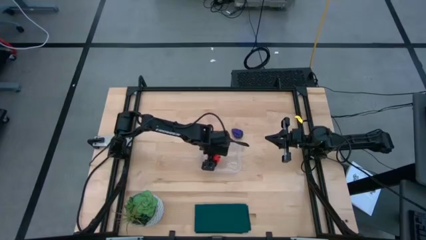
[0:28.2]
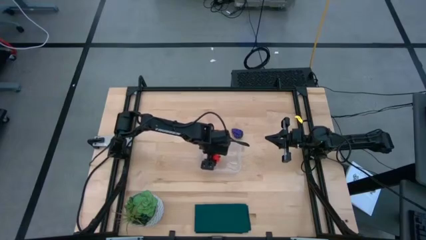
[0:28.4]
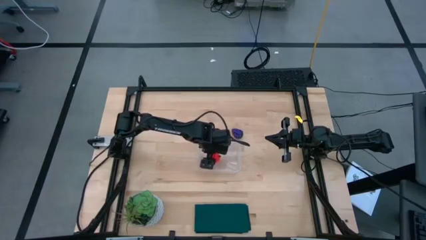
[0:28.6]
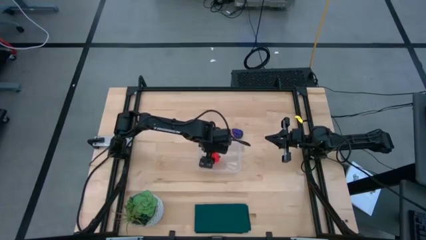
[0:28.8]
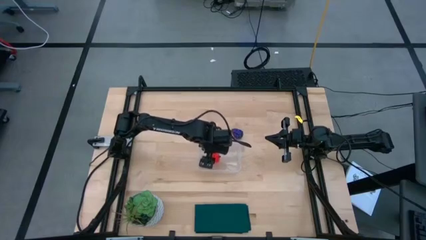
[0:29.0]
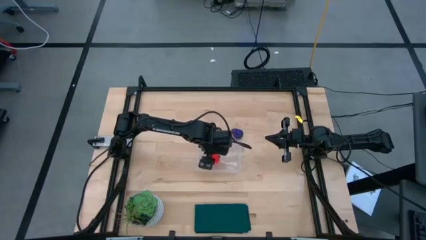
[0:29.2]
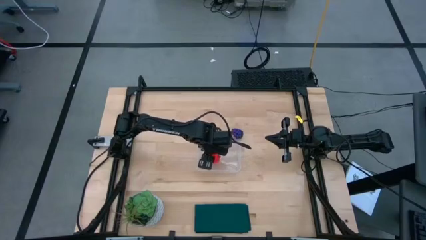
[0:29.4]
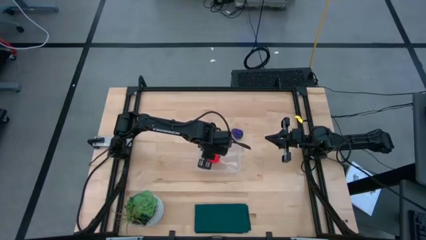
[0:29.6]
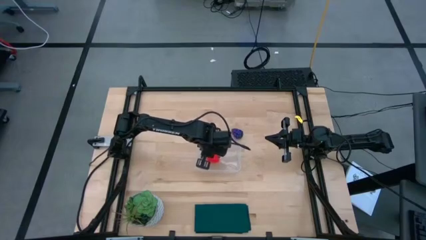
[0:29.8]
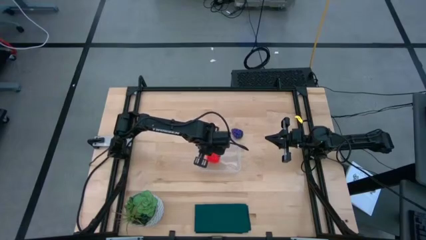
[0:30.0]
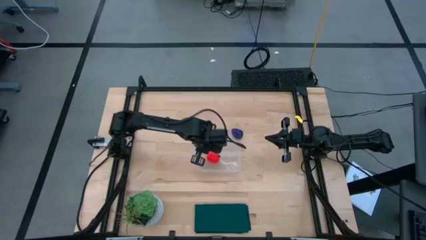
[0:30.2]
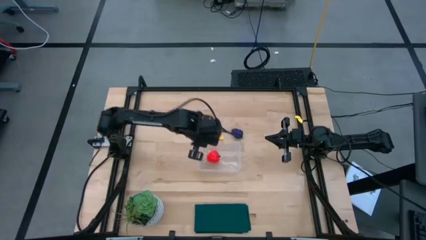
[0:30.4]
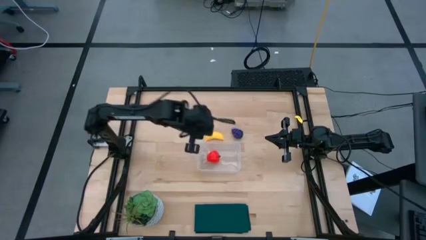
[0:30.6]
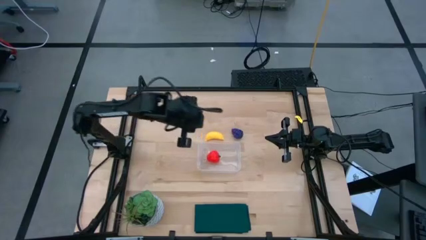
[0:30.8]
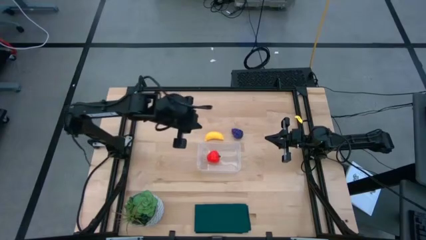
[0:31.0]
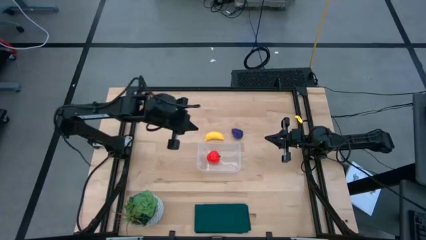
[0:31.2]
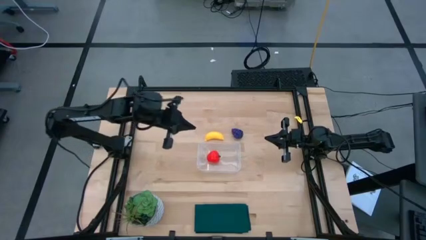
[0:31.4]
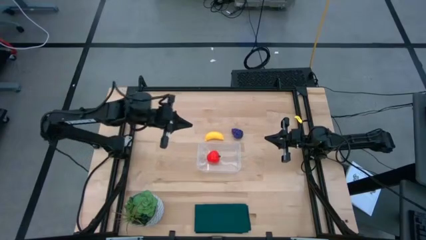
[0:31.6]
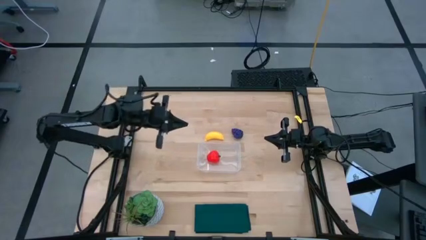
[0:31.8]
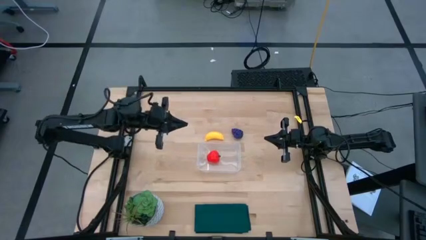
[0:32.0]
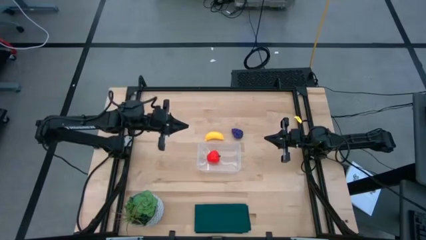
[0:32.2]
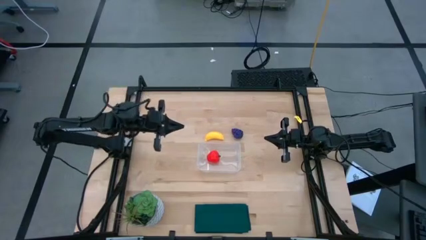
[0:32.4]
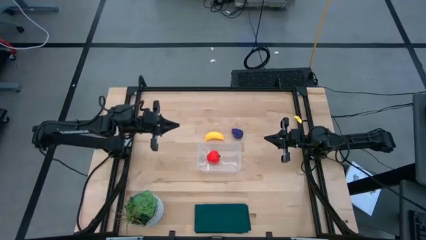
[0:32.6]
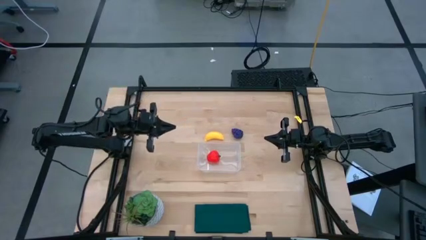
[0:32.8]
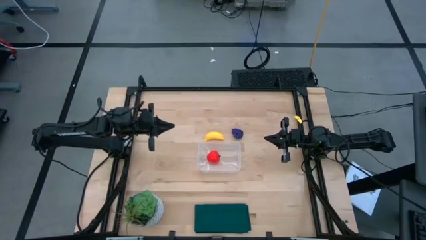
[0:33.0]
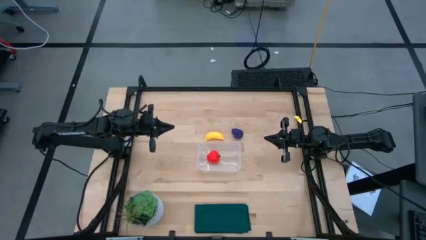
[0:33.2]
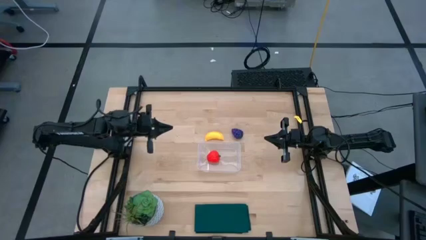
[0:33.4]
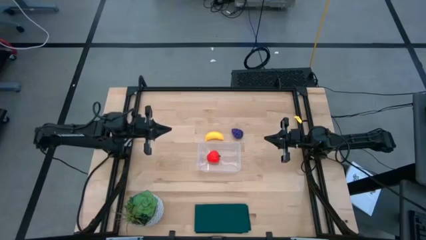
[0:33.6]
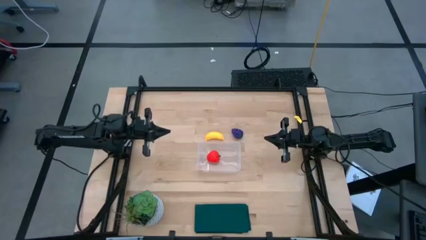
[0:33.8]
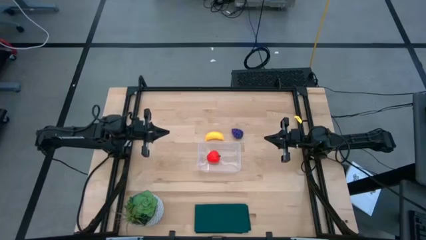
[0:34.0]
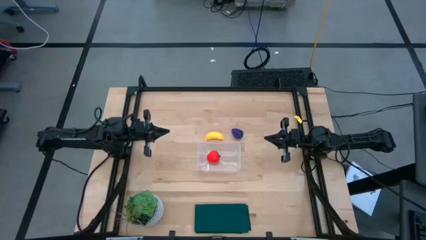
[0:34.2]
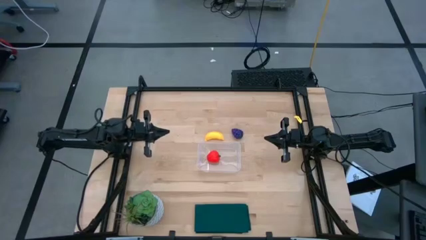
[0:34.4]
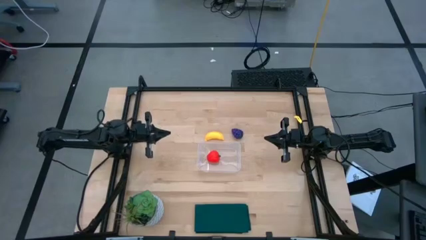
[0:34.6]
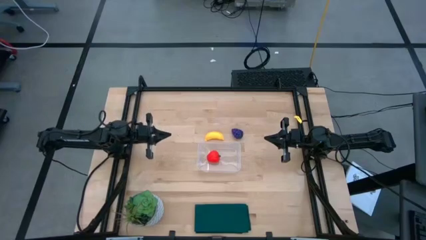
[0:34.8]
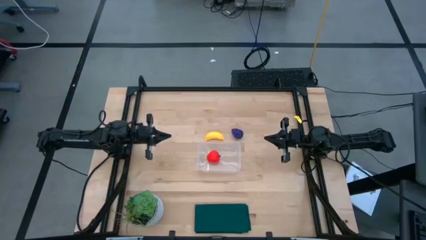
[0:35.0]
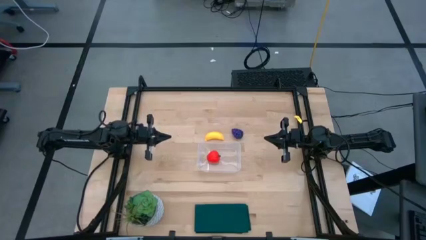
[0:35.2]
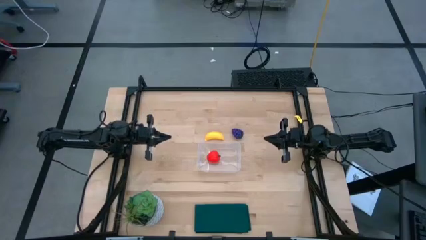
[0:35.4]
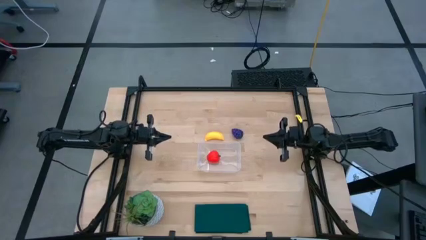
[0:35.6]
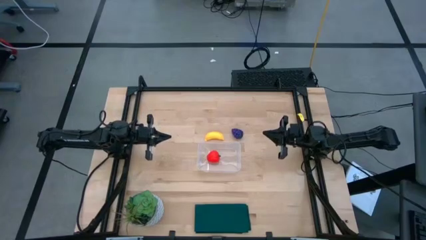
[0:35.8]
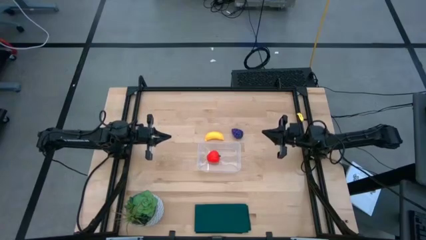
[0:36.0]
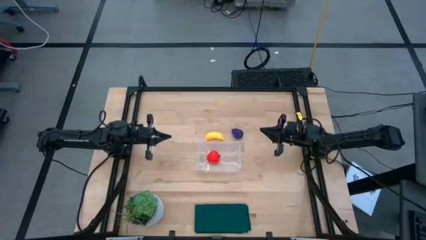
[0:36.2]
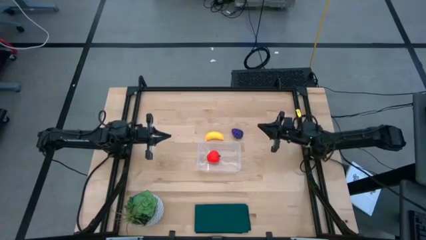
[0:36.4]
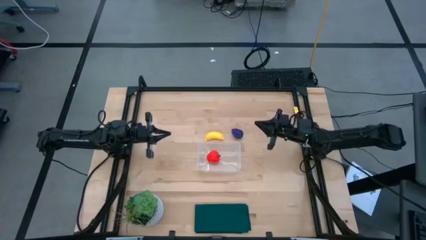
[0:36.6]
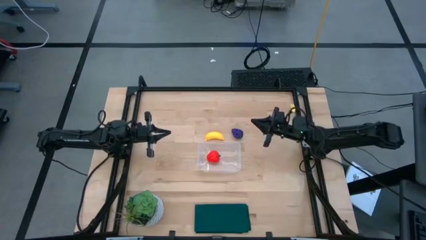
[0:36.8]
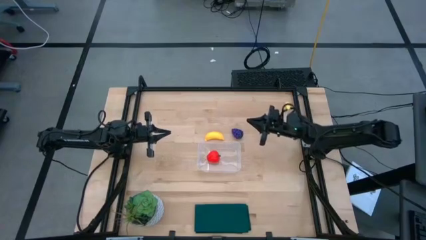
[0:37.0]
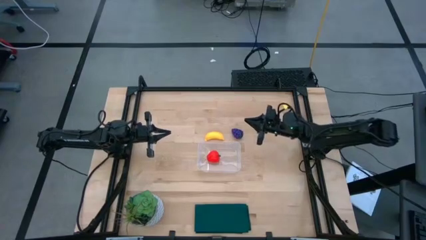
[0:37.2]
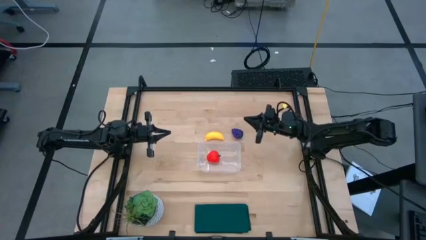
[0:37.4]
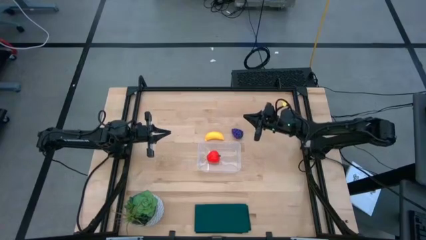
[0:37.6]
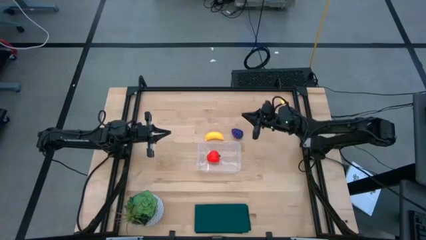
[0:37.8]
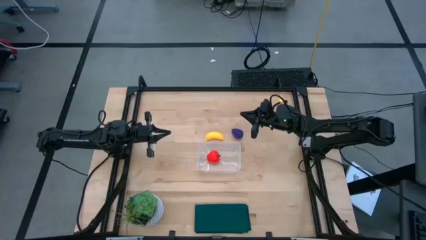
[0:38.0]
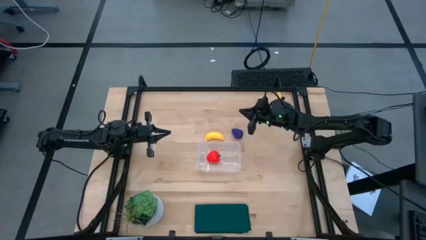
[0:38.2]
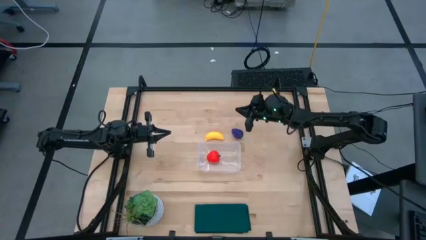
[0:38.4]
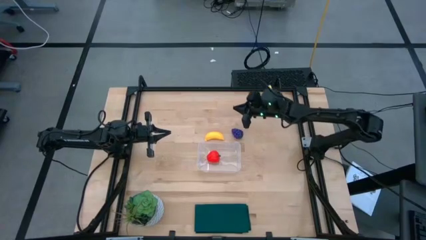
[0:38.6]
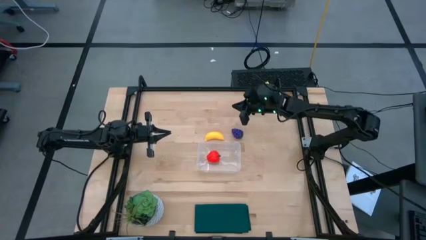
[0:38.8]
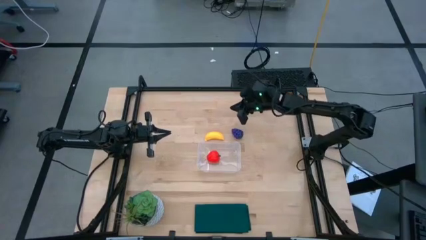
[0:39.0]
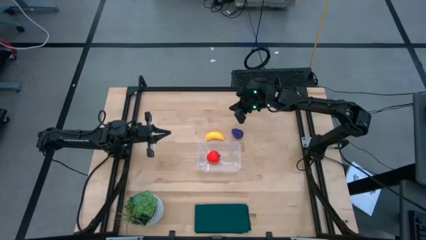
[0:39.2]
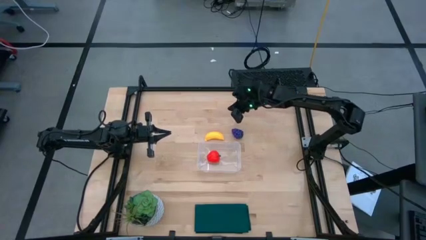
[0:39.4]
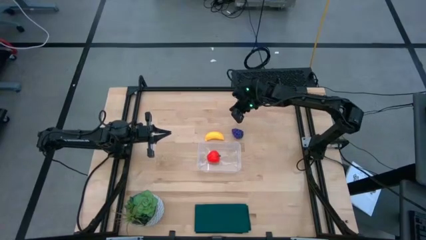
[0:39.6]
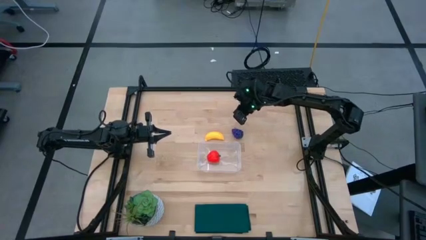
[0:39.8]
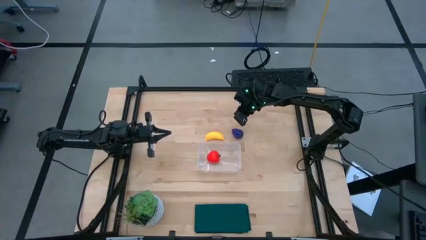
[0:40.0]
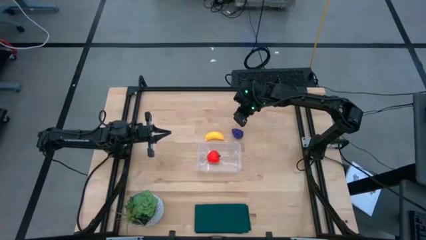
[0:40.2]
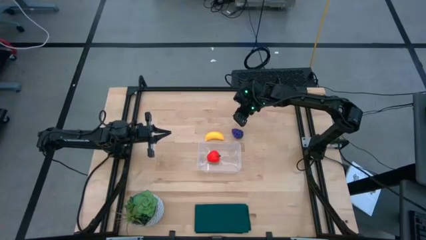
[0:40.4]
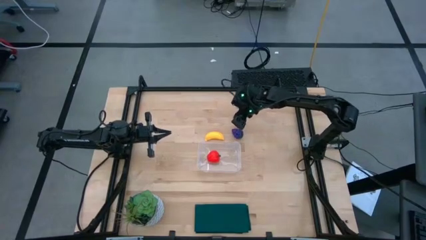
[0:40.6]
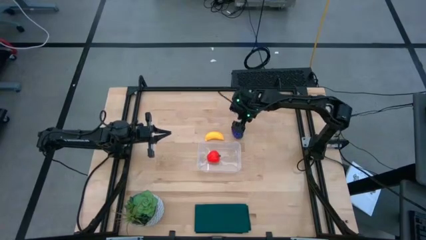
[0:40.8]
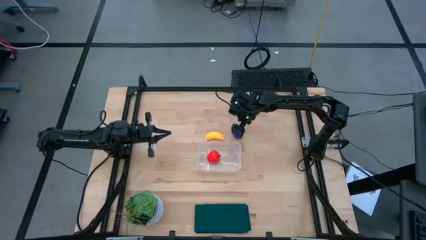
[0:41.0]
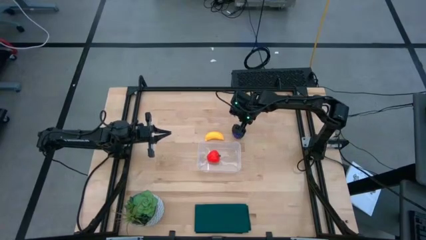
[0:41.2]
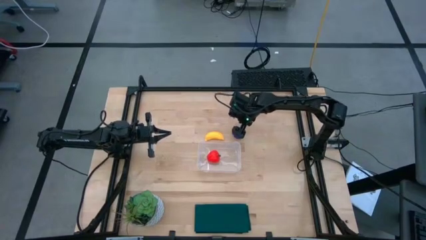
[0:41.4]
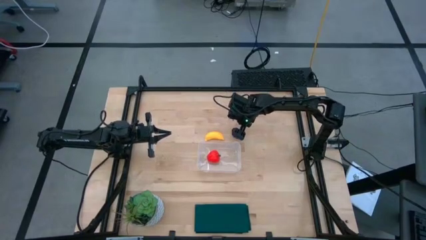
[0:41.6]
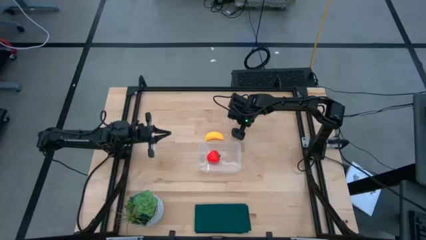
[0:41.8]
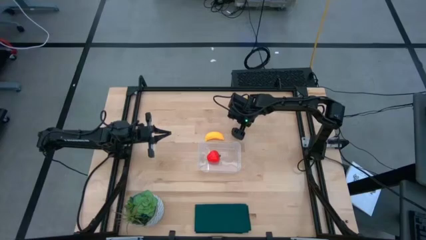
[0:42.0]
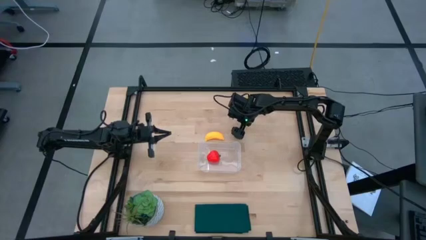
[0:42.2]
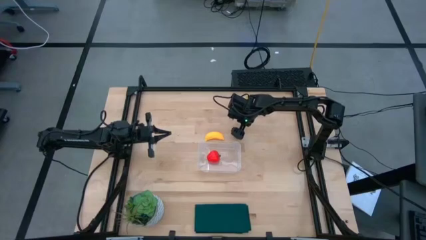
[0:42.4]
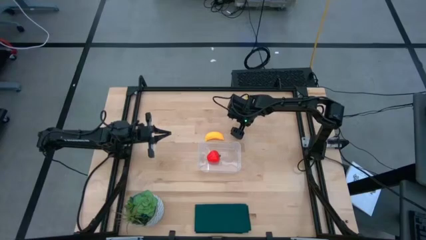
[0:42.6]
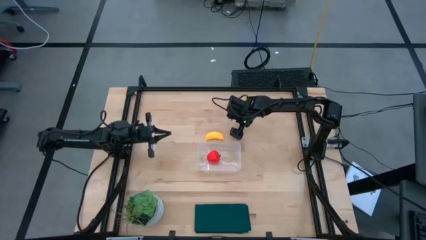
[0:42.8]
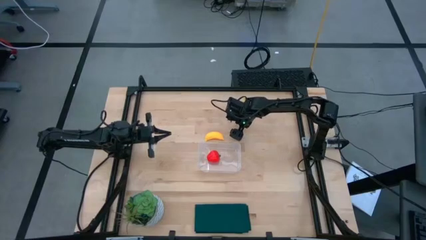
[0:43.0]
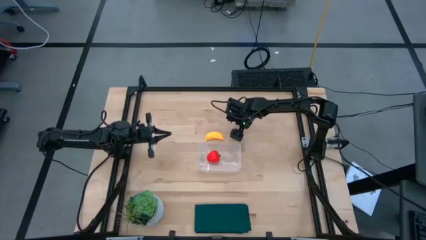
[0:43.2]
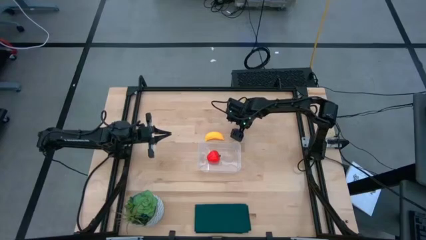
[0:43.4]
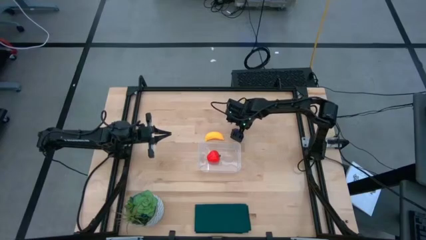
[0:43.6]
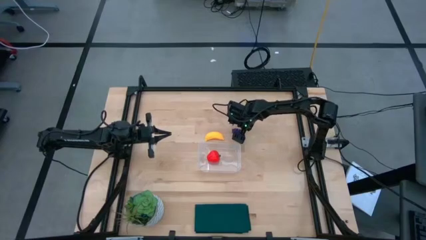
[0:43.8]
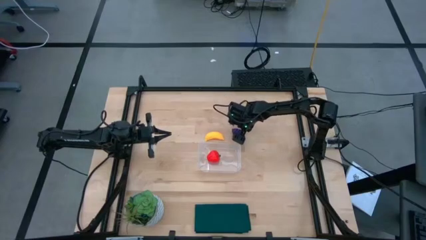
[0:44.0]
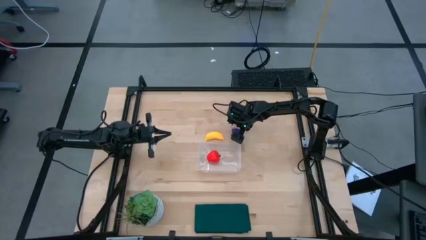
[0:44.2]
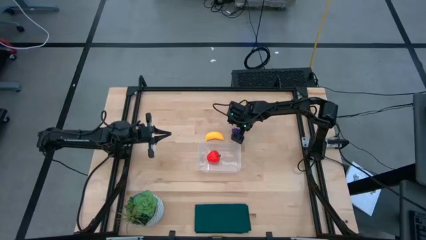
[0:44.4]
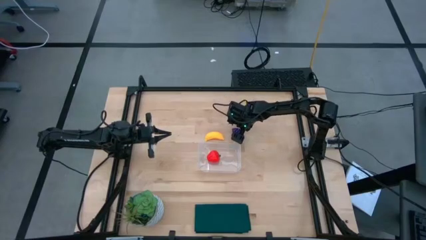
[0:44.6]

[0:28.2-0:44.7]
Task: Pick and placing Produce into tupperware
Put the grapes into the transparent bin
